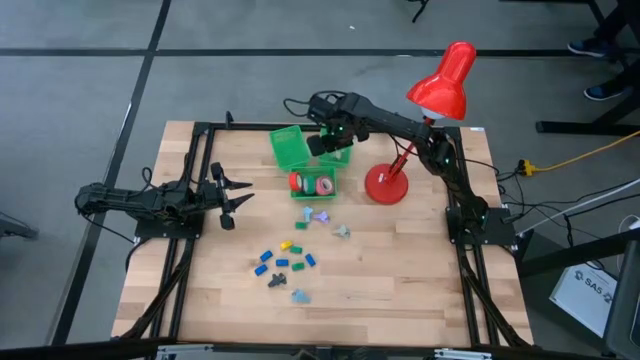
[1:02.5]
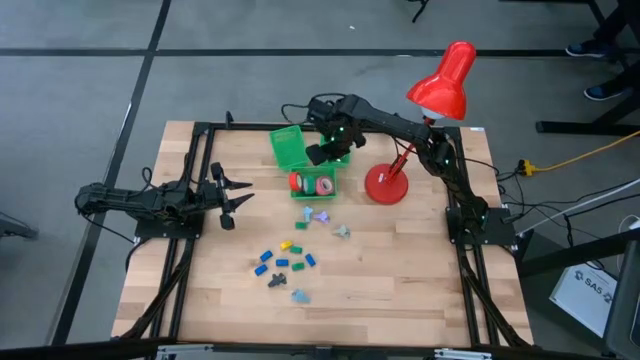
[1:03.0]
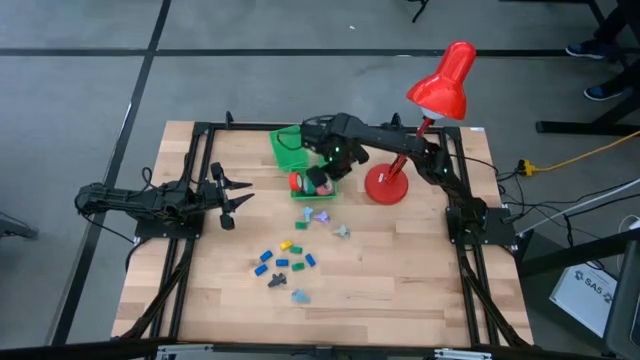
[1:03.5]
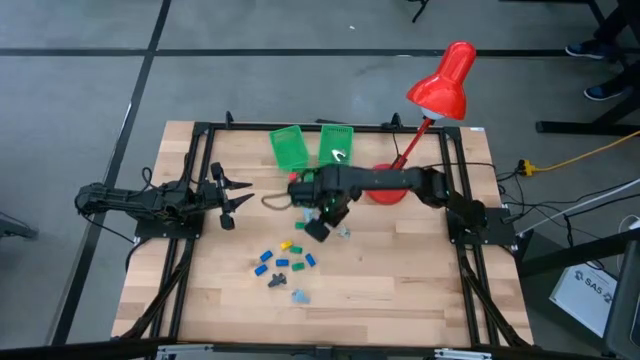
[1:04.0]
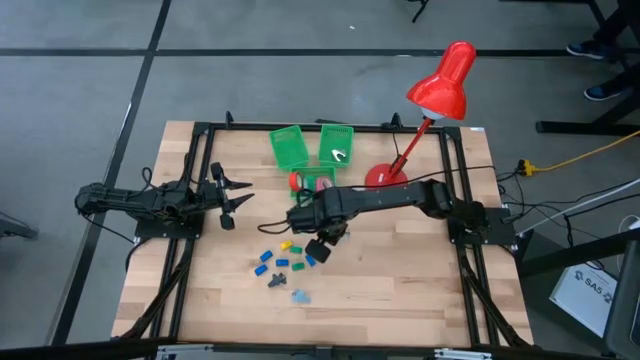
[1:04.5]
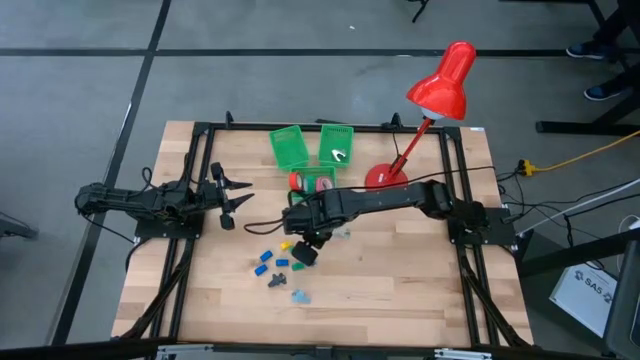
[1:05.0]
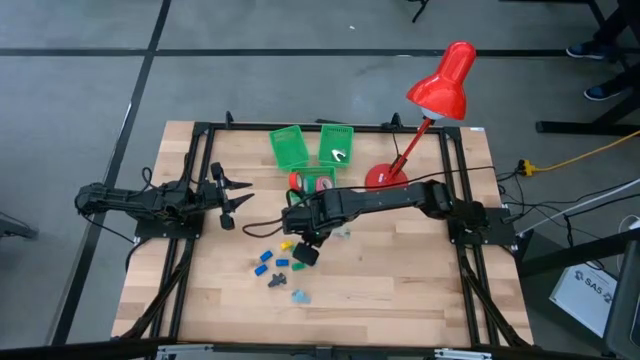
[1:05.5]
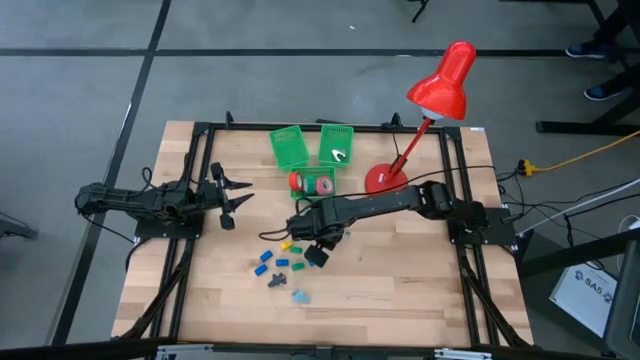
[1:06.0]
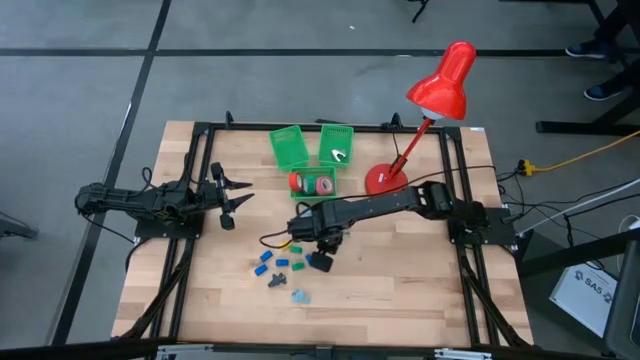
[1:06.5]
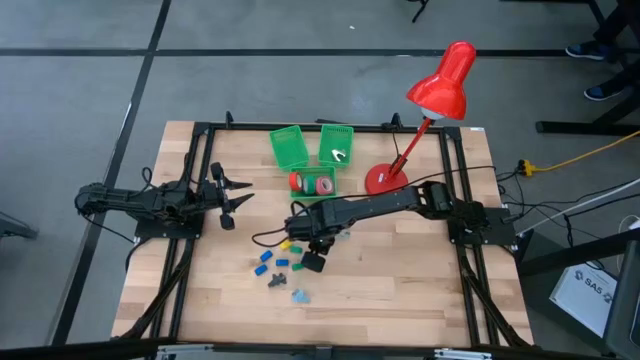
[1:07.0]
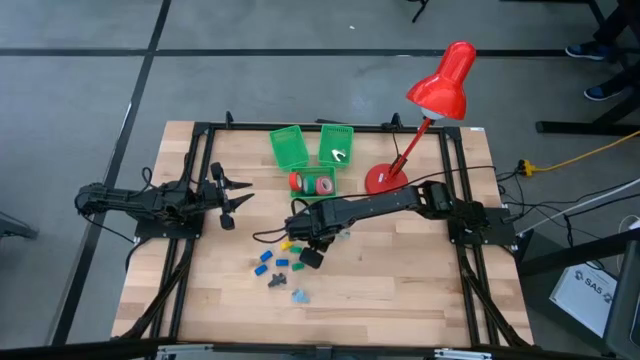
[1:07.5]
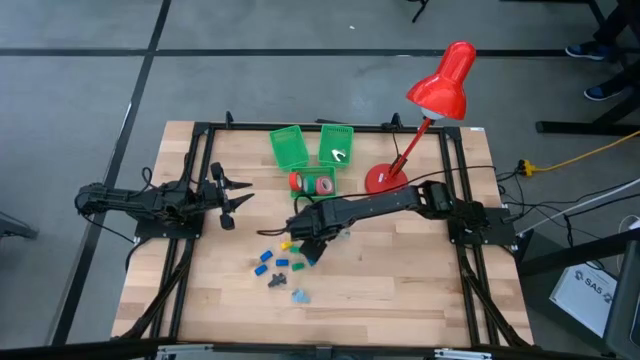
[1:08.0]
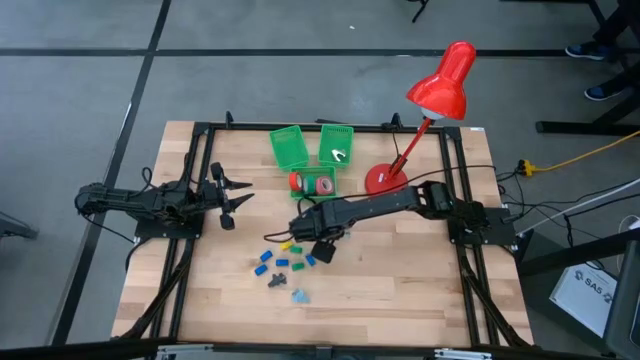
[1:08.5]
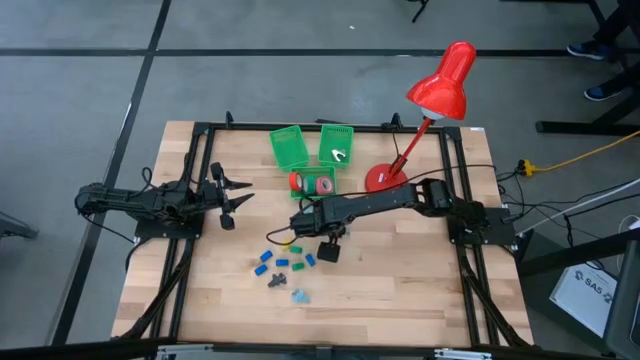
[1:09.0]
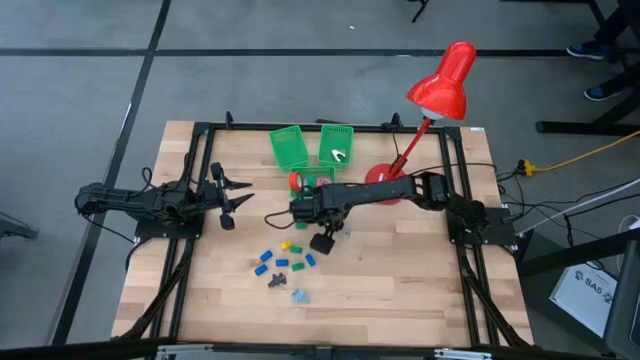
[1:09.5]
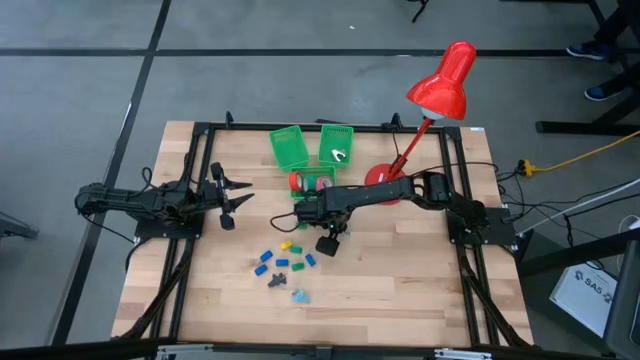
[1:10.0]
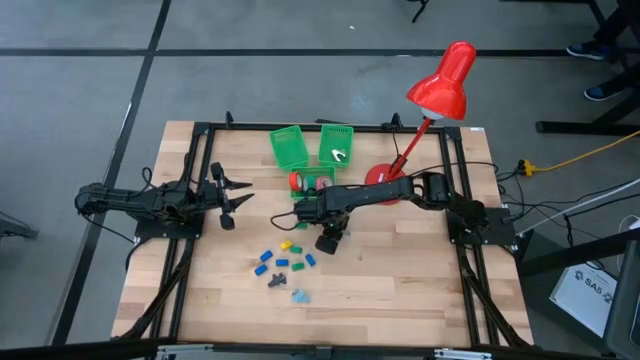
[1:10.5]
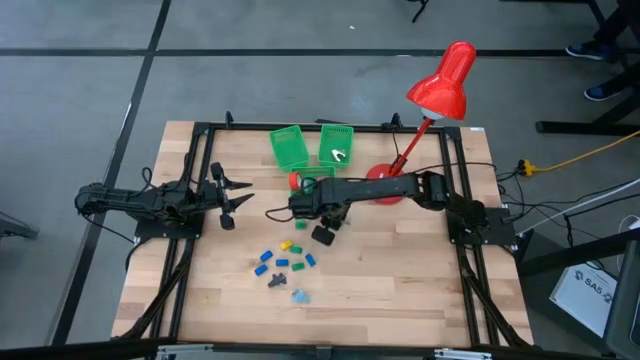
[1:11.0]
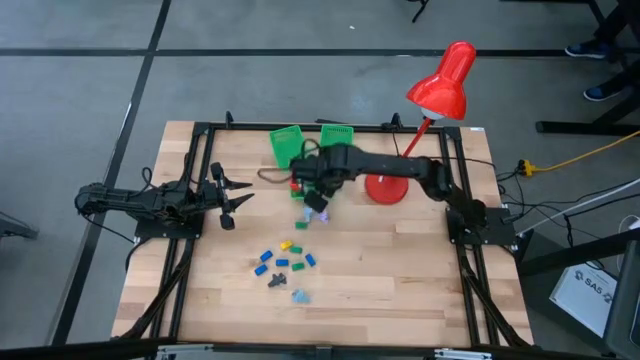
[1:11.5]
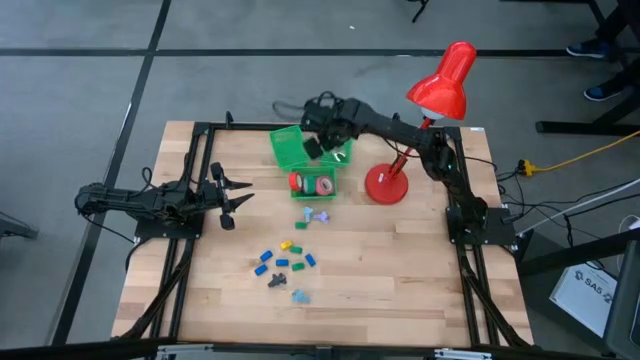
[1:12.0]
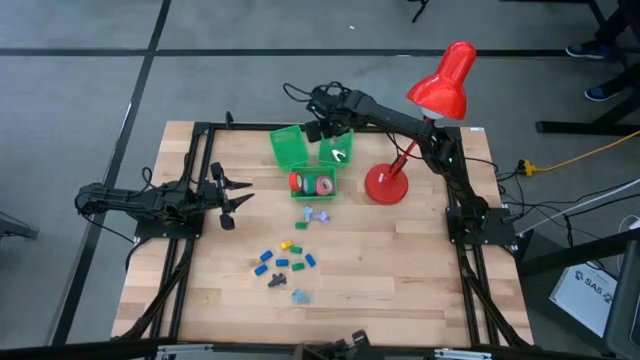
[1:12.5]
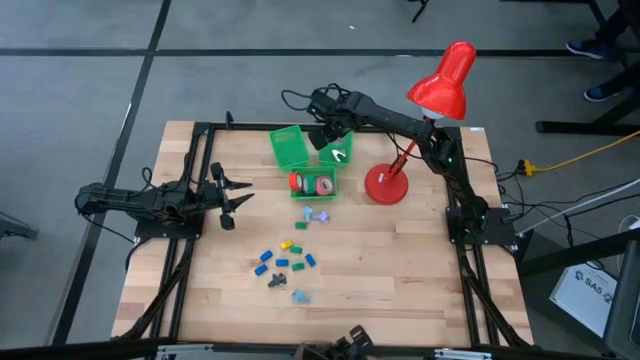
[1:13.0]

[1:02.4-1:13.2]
Task: Pick and place Stapler, Stapler remover, tape
Put the gray staple remover into the right green bin

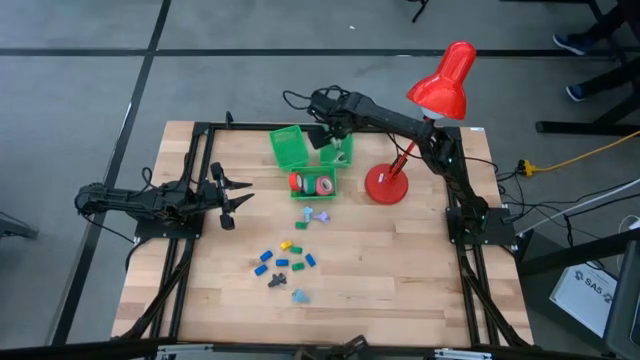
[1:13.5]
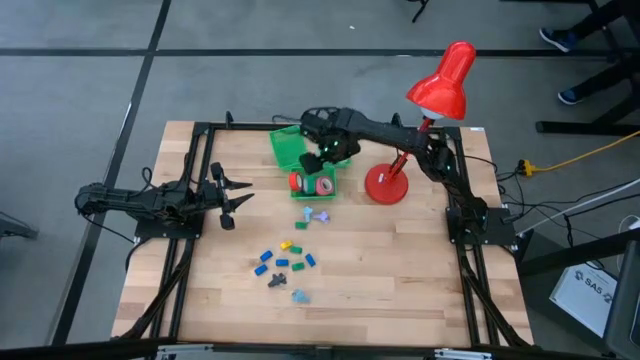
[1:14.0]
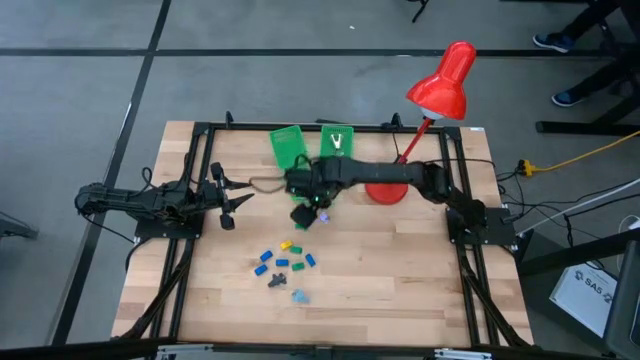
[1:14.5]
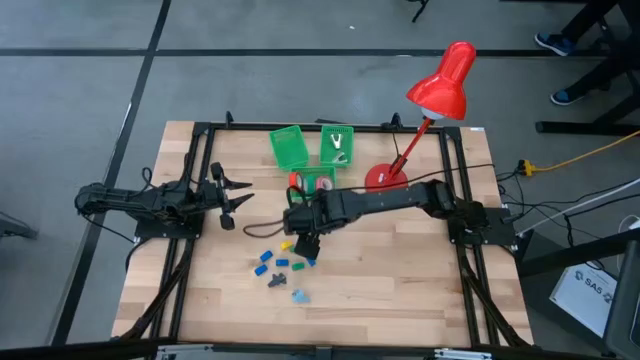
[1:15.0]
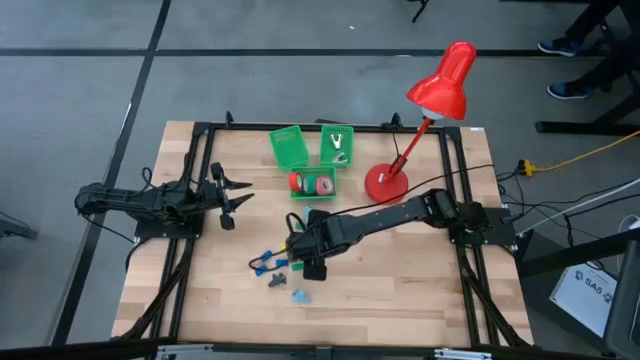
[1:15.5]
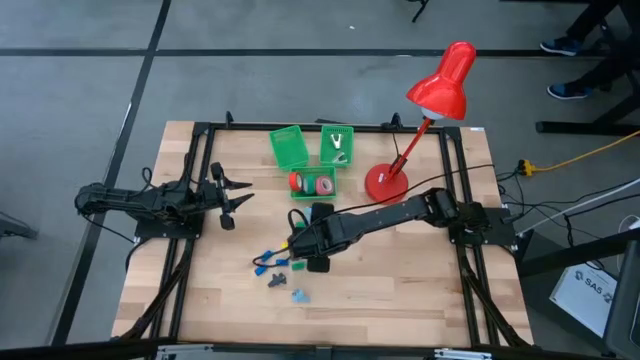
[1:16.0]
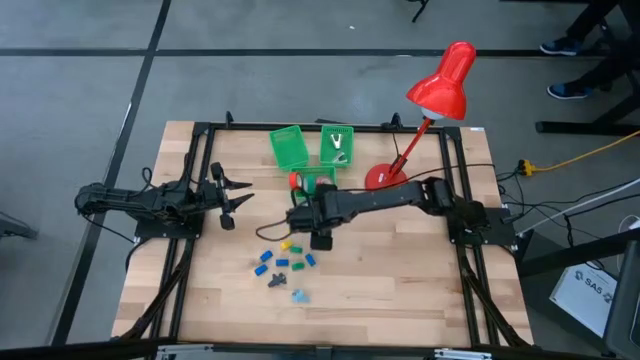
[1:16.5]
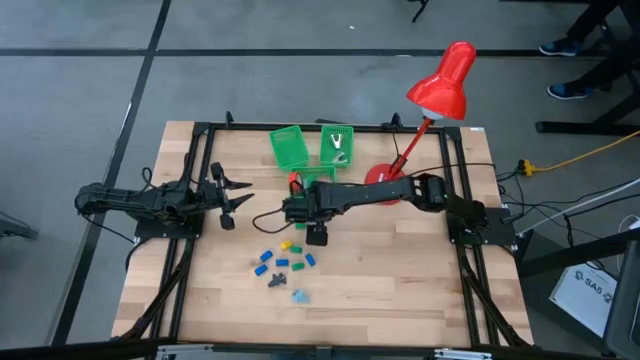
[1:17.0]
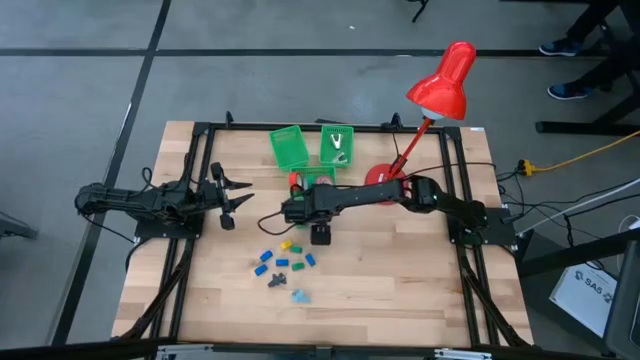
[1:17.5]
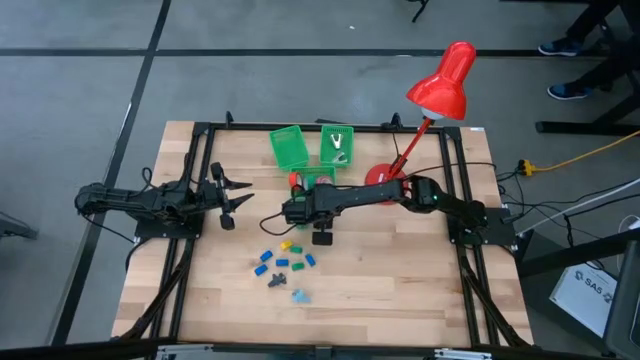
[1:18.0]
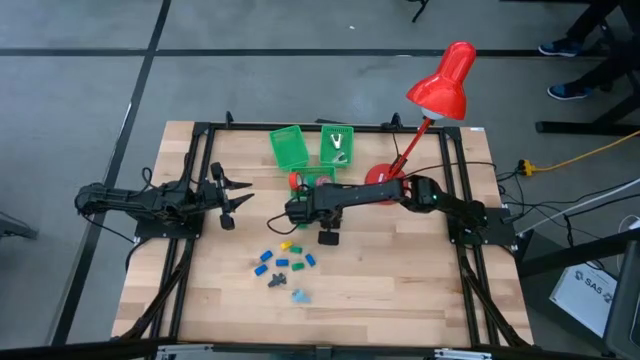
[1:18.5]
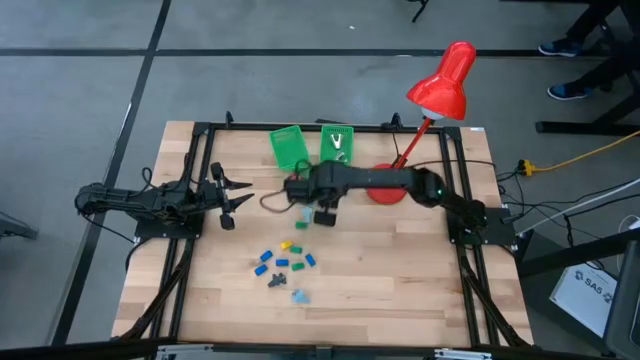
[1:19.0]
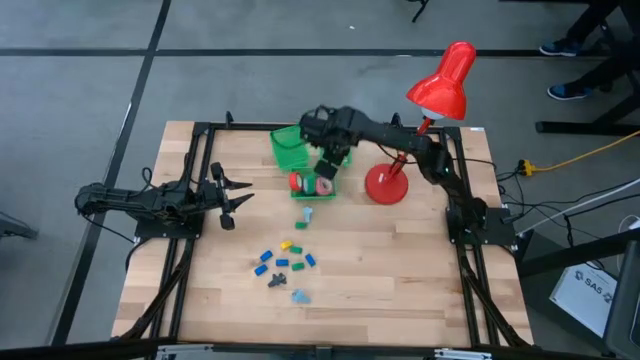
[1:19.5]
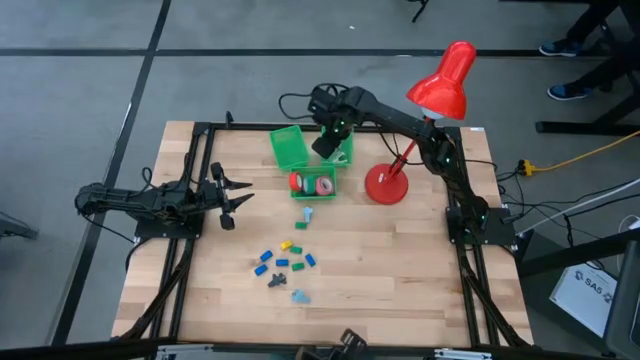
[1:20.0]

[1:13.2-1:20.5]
Put the violet staple remover into the right green bin

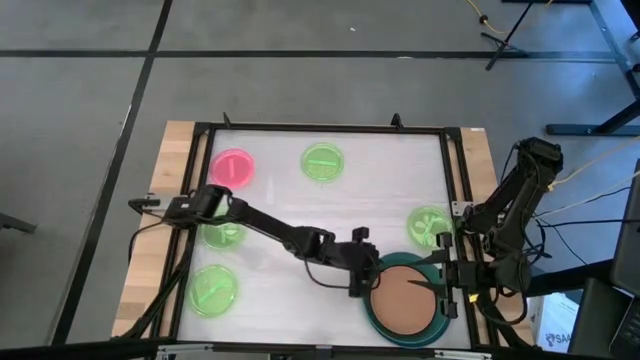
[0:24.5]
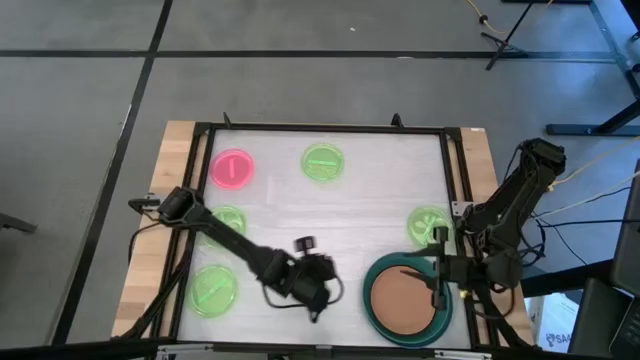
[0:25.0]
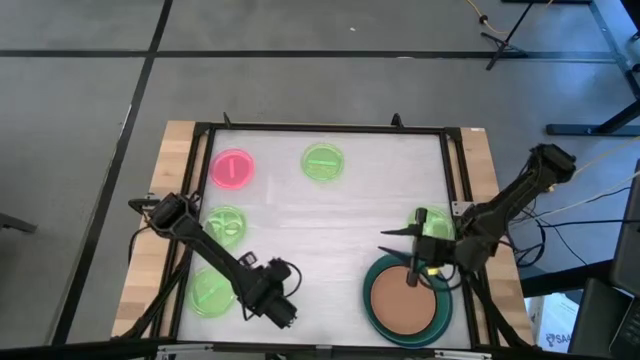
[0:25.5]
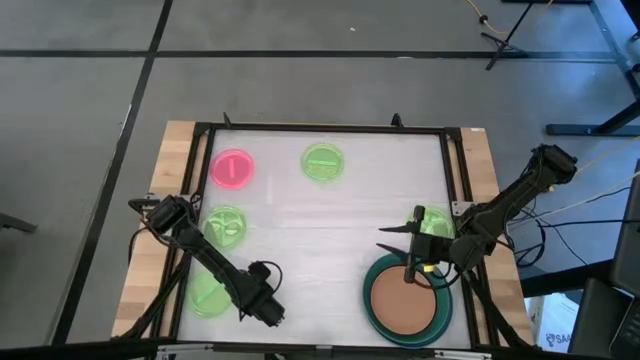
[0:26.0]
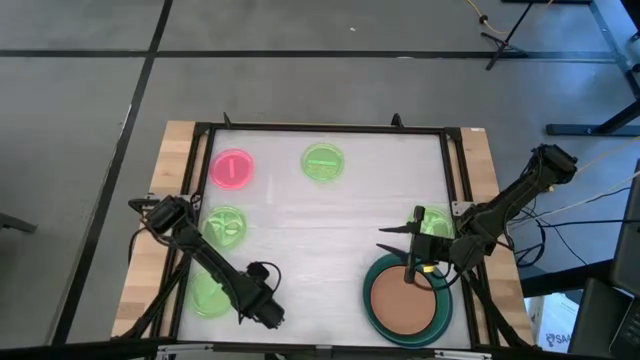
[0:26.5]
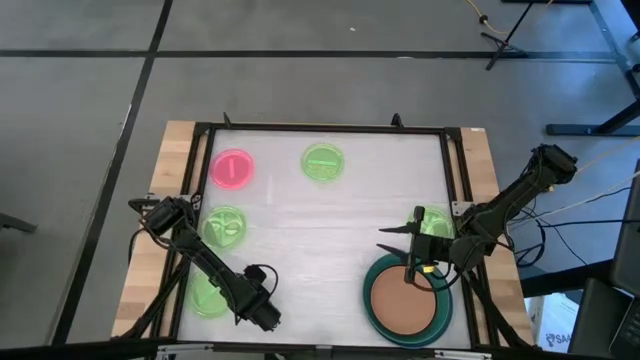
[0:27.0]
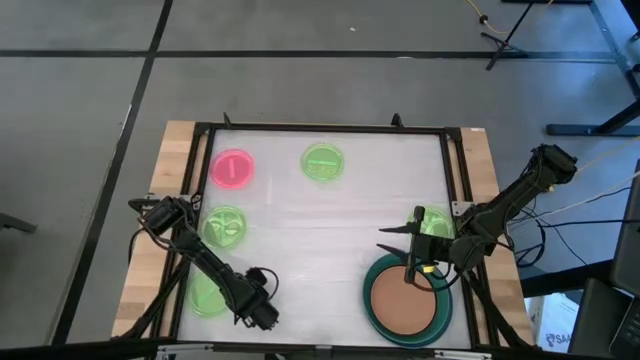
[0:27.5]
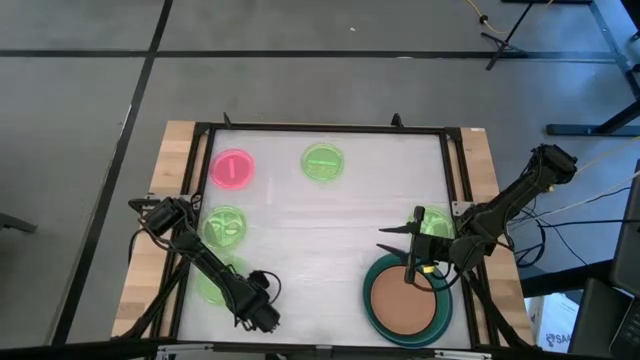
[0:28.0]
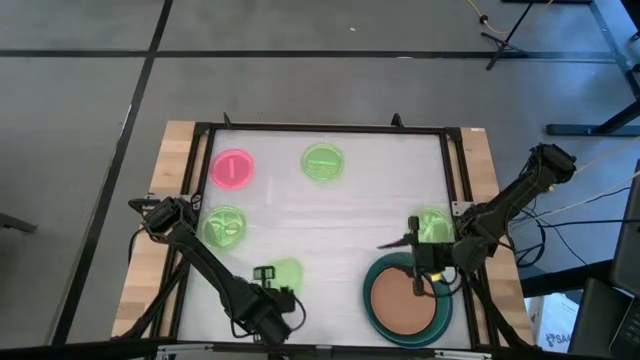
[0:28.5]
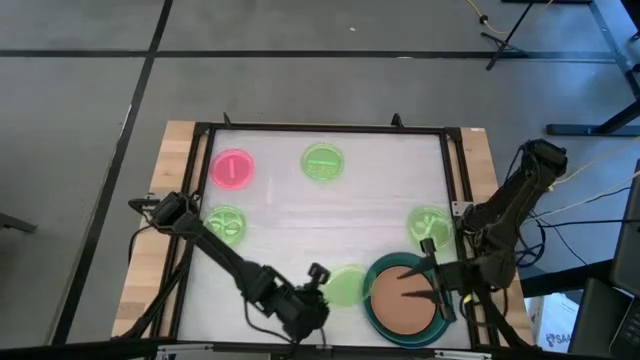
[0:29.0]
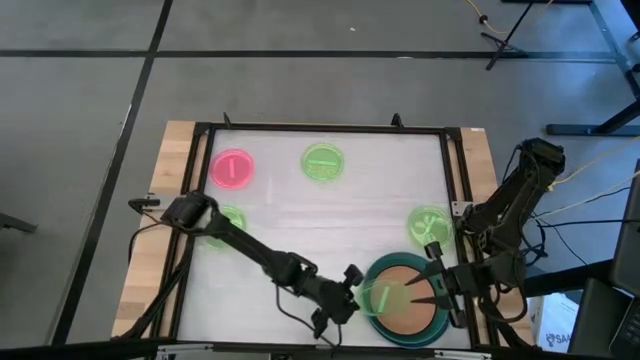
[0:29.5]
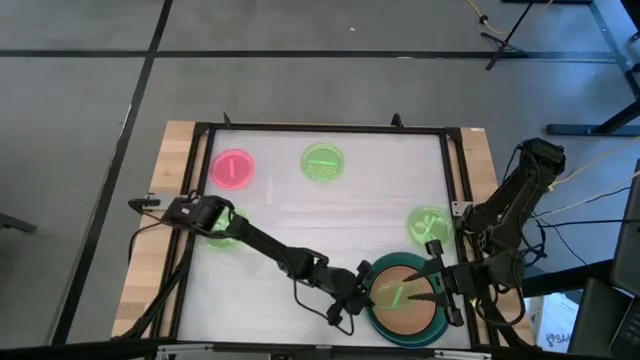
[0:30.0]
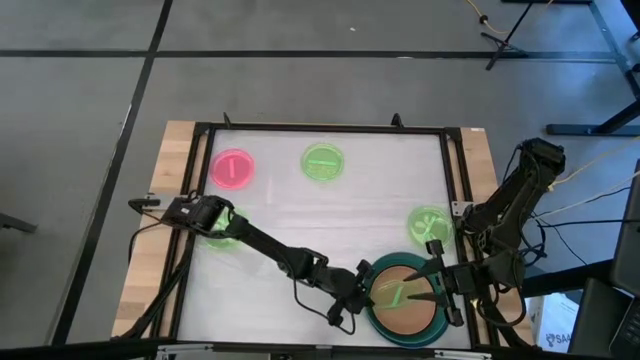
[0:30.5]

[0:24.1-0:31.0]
Task: Stack plastic plates
Stack the green plate on top of the orange plate
